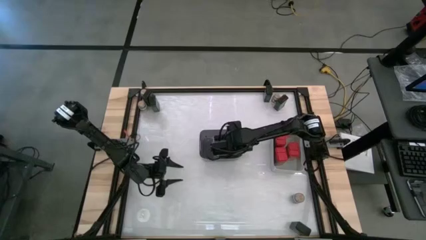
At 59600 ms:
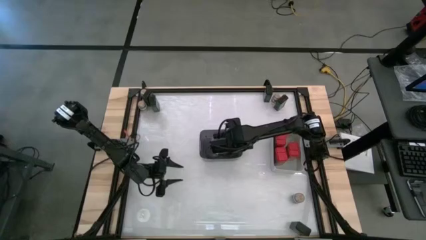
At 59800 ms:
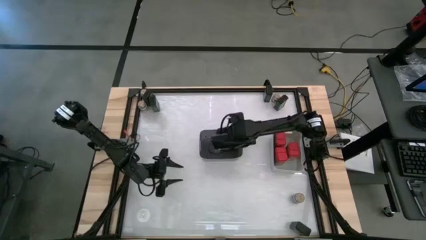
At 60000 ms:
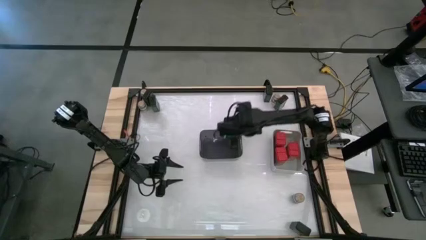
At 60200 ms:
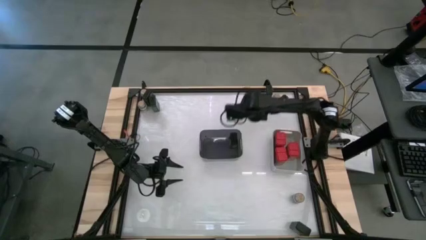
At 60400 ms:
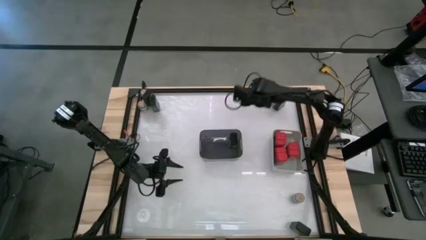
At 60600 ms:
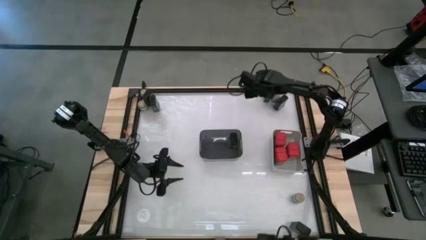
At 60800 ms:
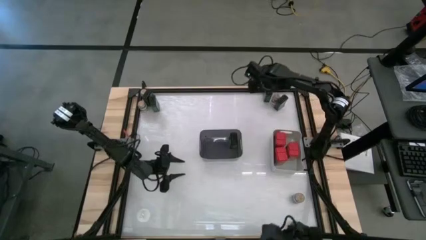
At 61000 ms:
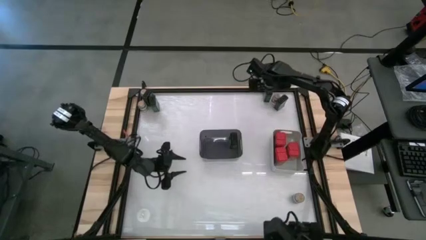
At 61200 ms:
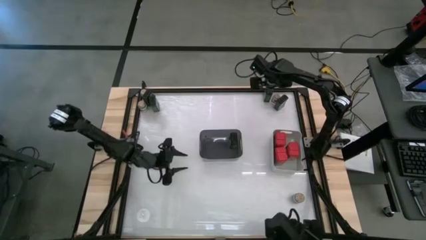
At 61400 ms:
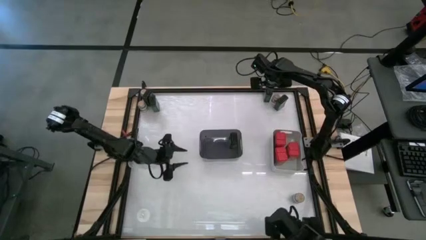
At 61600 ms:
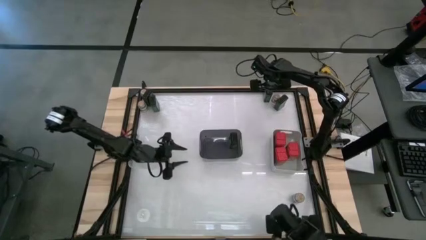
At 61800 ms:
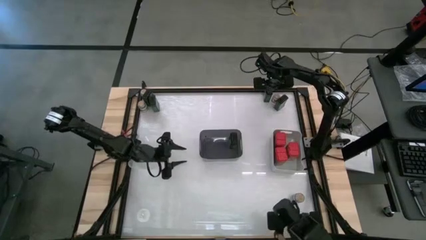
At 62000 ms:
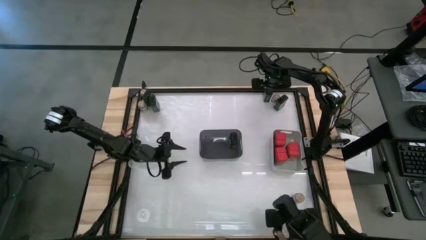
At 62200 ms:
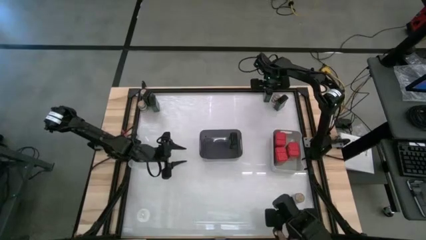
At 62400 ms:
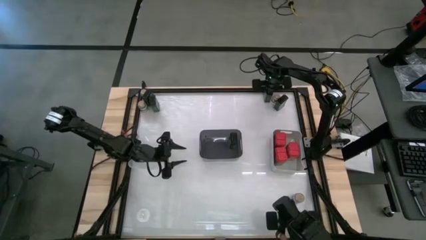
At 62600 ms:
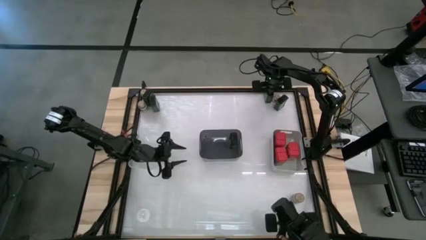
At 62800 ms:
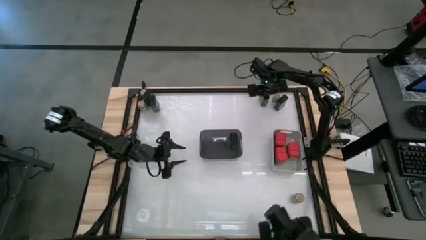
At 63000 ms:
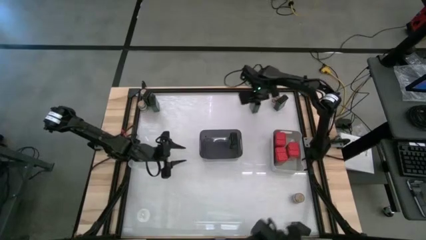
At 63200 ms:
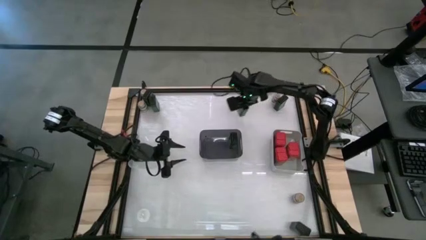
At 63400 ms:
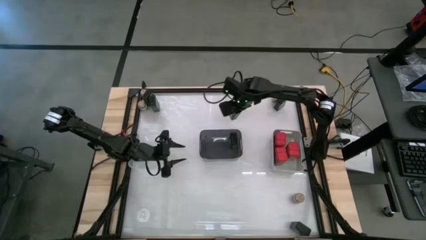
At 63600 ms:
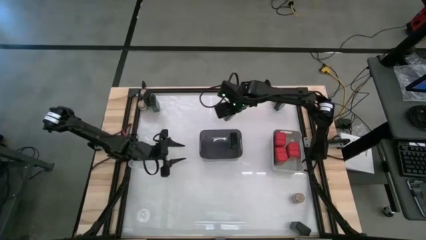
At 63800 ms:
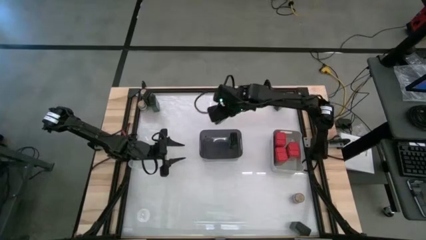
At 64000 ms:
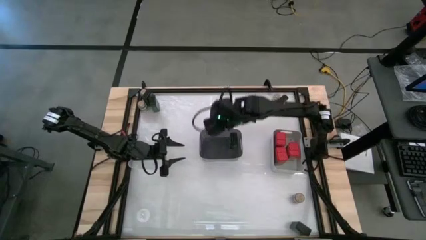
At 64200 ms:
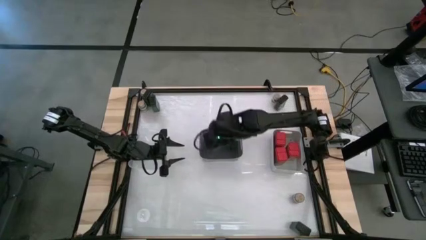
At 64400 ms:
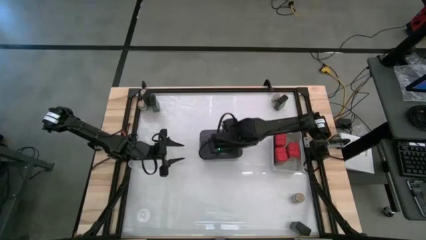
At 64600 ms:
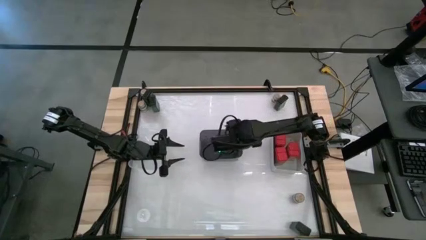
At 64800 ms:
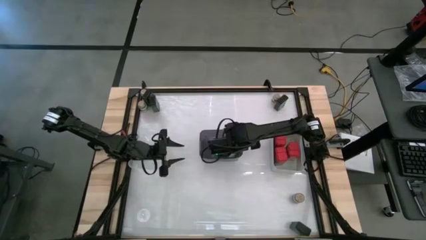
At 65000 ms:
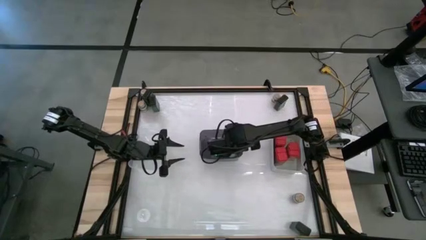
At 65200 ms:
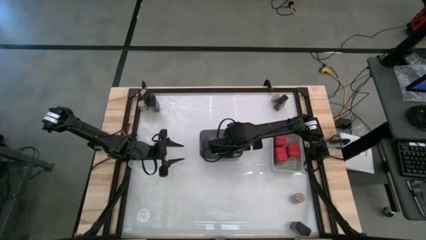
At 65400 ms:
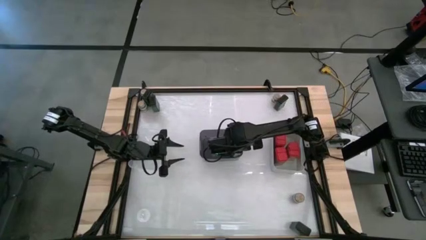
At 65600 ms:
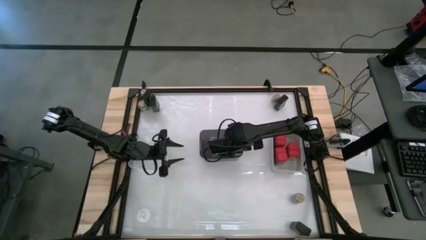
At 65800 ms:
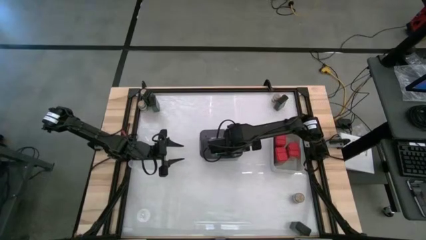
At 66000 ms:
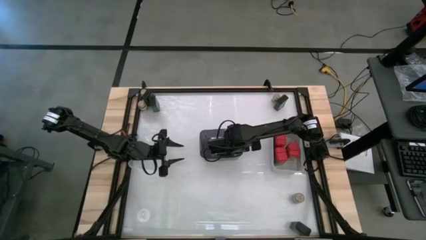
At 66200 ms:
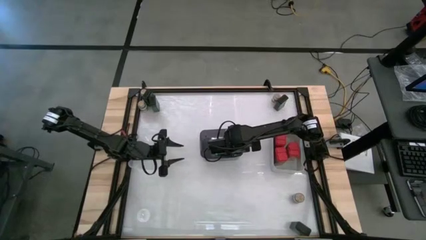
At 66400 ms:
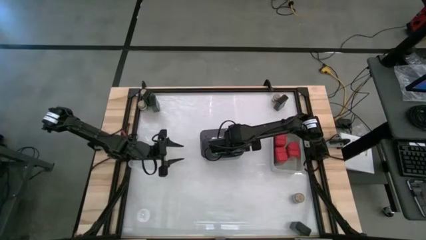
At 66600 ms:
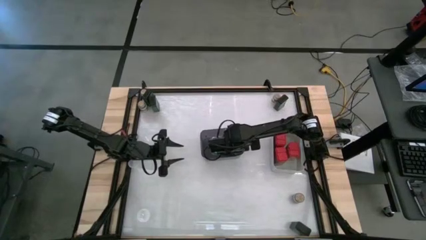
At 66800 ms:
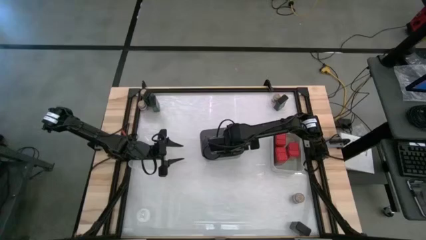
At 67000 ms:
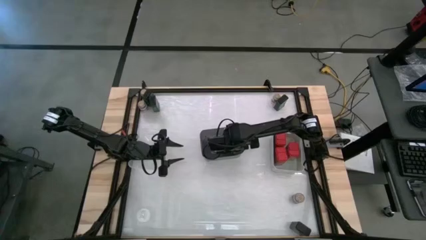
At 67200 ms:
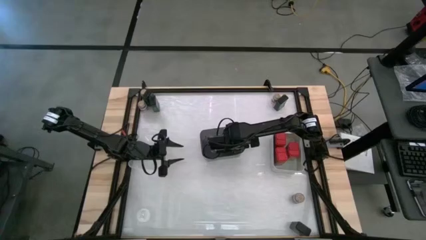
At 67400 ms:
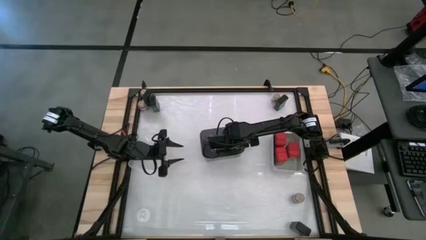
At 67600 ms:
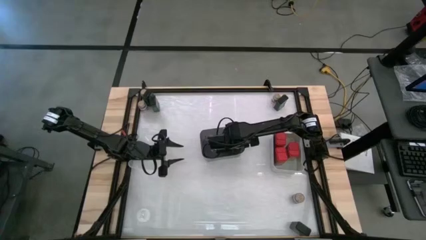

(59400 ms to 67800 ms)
Task: Sort spices by type
Put the green spice can into the gray bin

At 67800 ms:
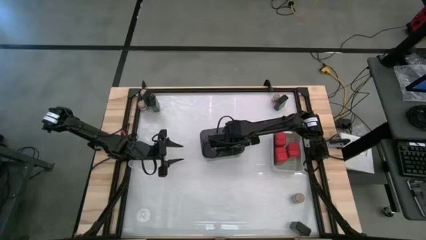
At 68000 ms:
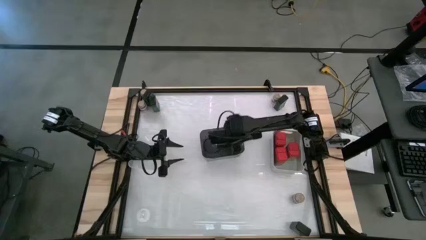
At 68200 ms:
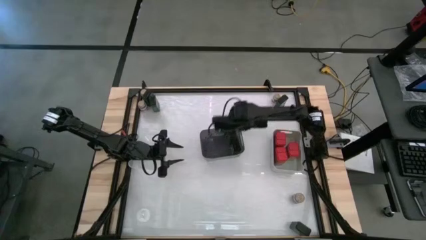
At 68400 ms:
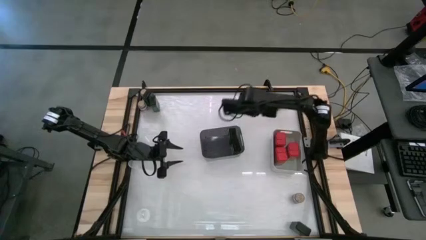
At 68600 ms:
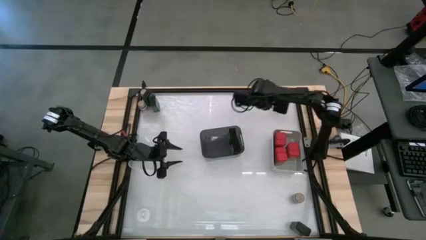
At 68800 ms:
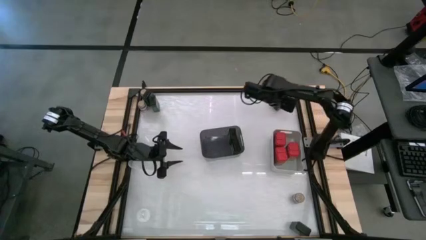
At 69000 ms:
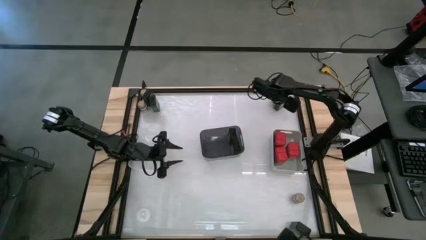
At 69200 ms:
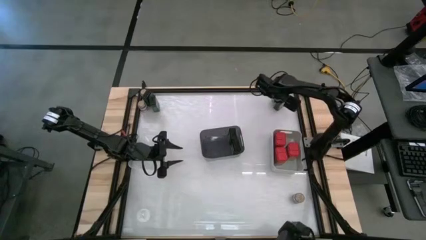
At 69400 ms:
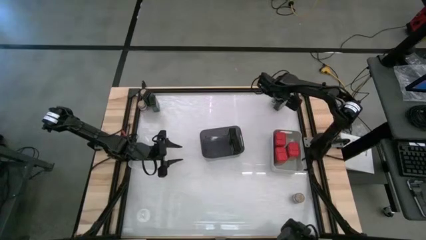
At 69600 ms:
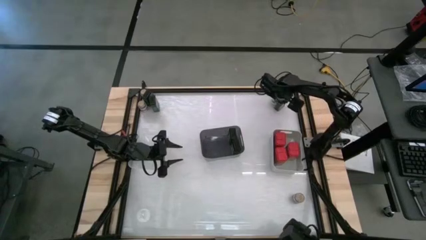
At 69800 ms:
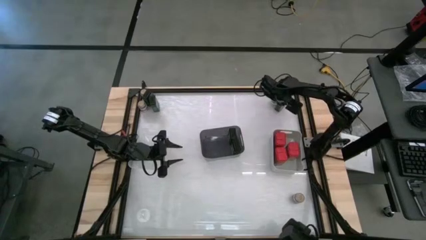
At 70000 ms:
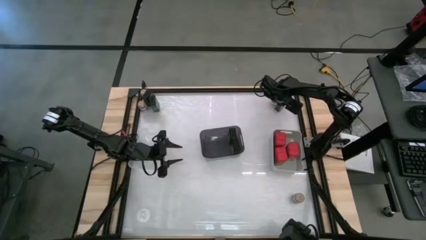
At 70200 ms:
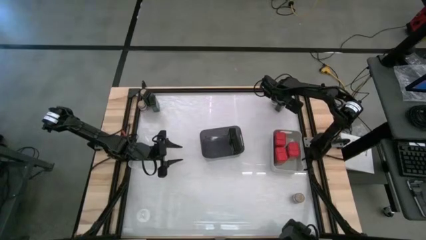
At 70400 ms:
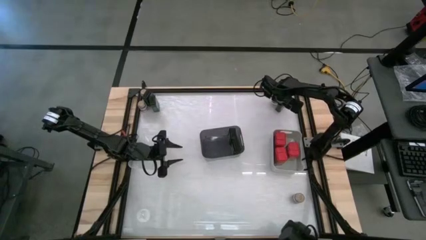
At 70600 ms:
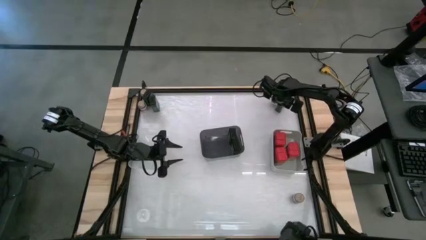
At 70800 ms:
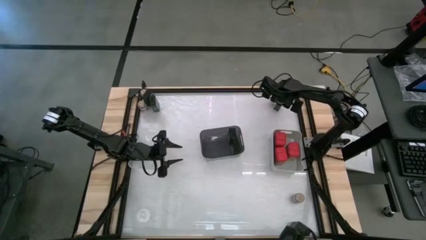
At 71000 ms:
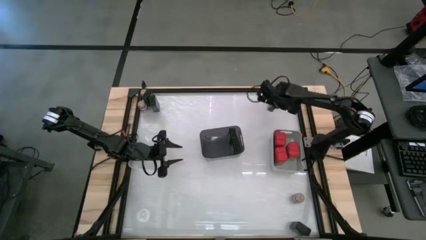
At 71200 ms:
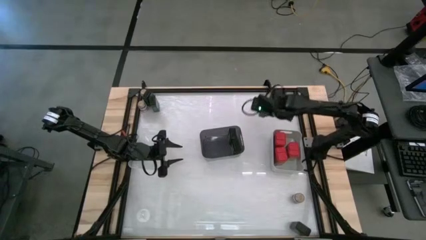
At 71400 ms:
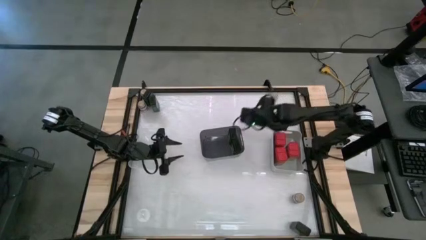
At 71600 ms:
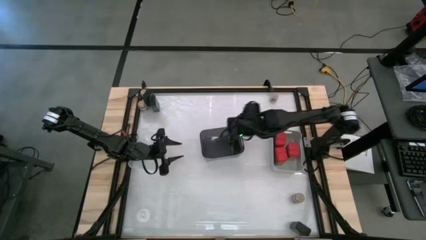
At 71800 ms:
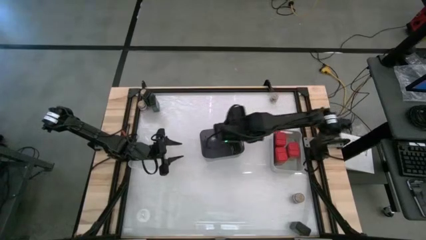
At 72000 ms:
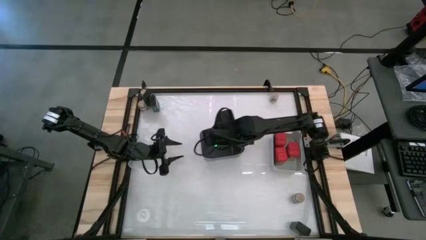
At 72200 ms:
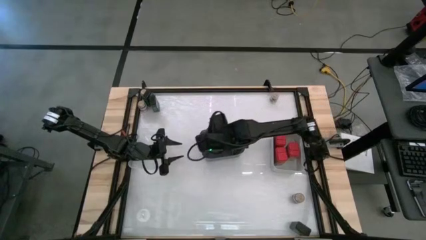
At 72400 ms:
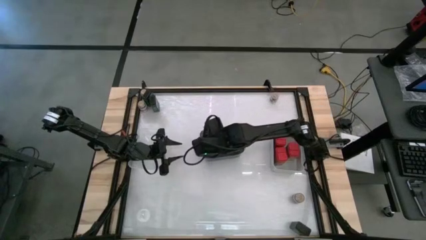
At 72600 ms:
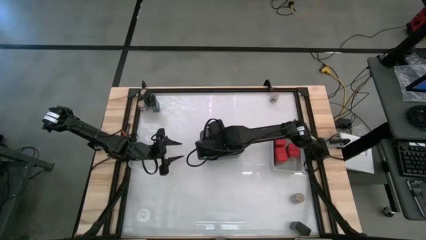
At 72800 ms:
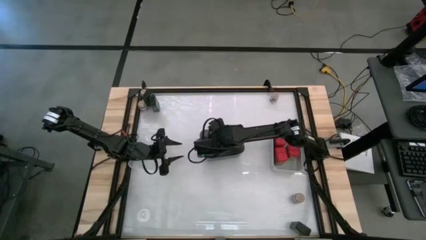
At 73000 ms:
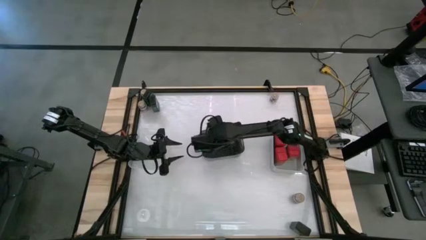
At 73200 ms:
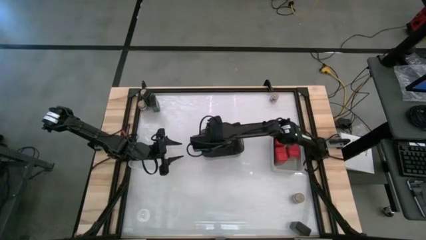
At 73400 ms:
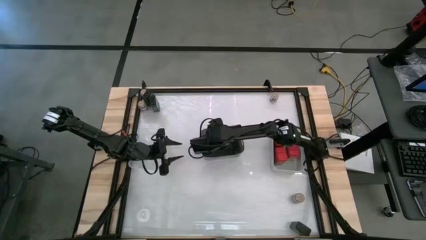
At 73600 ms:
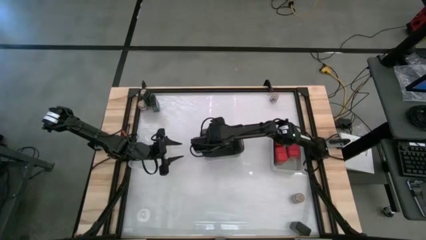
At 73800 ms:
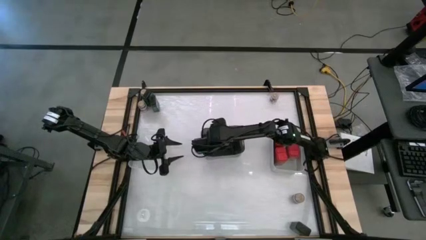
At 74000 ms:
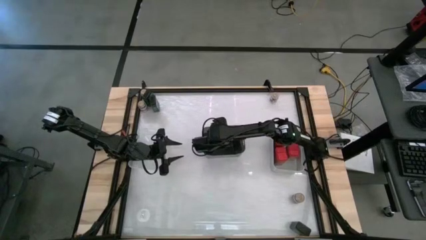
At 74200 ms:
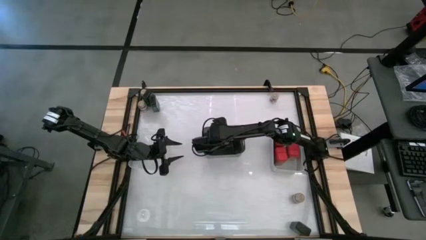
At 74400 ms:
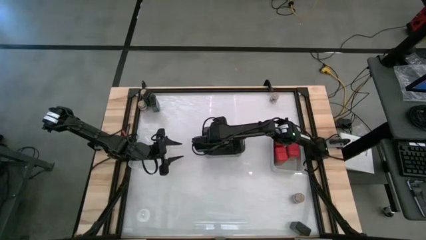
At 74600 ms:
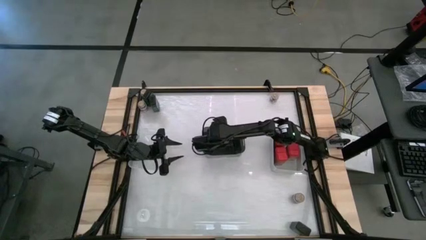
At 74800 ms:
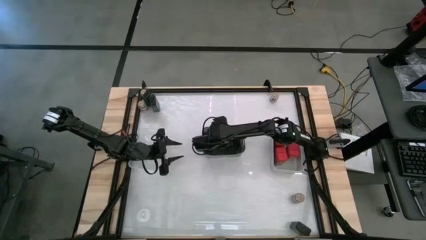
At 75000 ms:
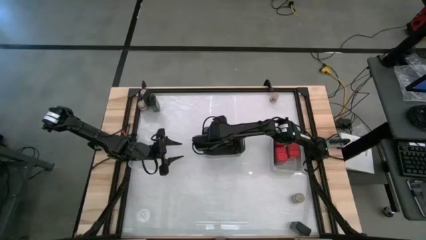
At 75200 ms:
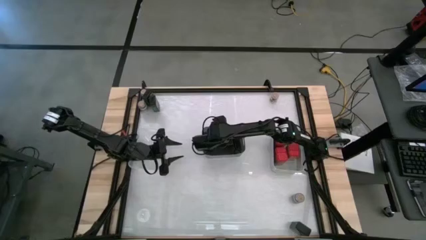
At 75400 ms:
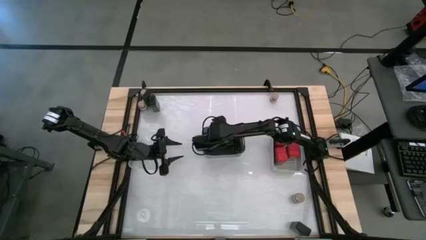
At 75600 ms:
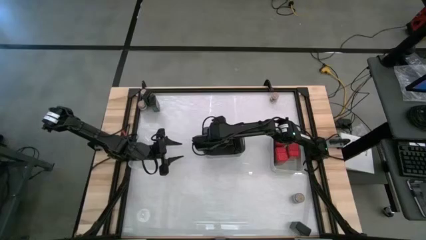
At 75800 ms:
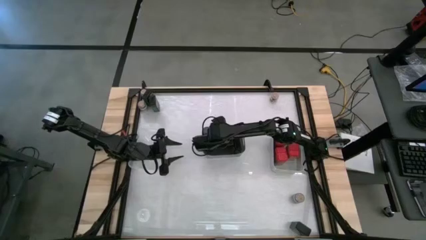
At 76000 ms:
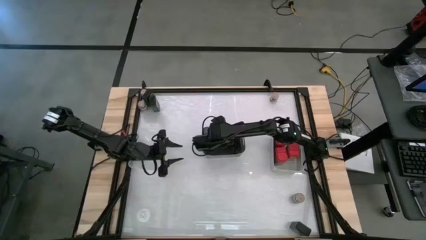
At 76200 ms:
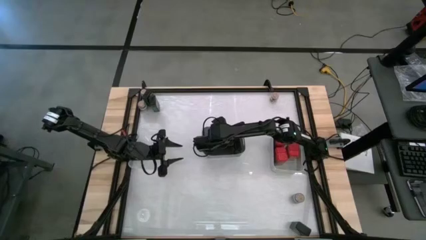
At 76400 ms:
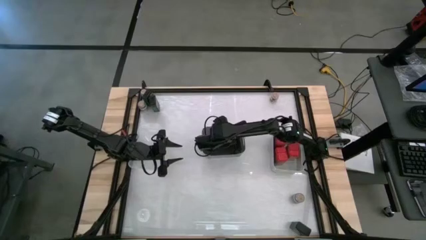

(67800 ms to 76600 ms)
Put the green spice can into the gray bin
